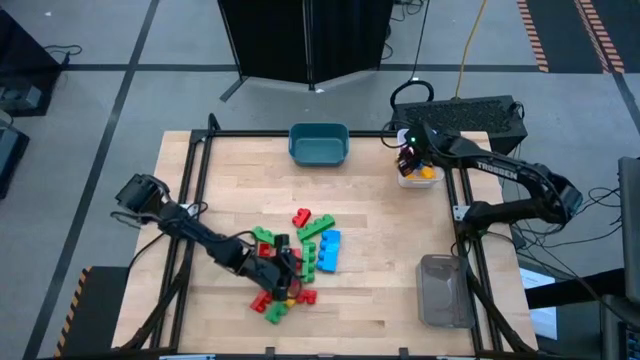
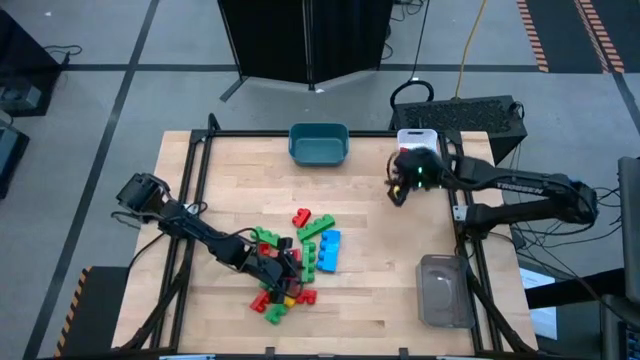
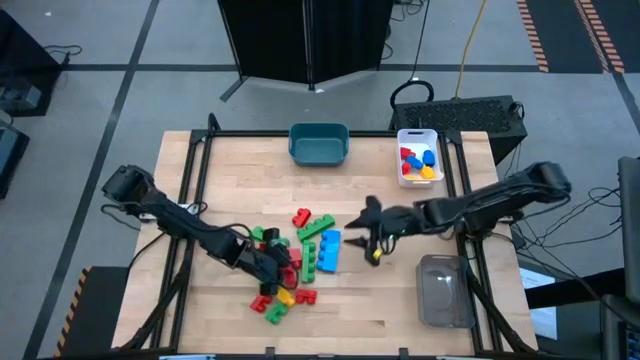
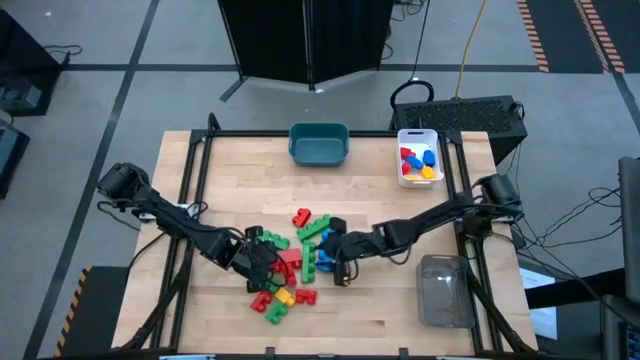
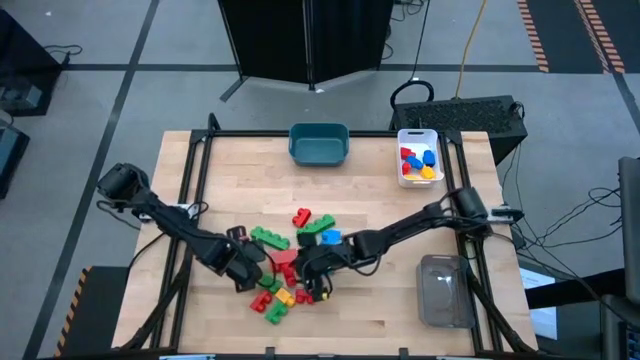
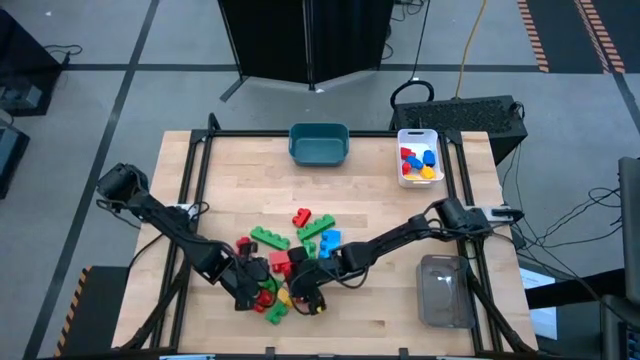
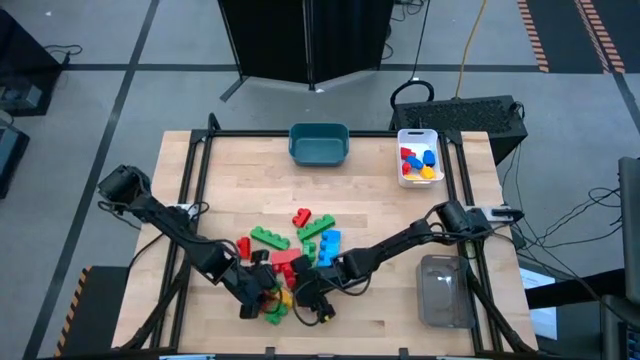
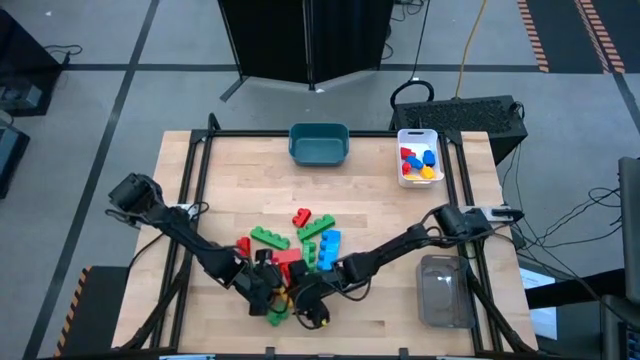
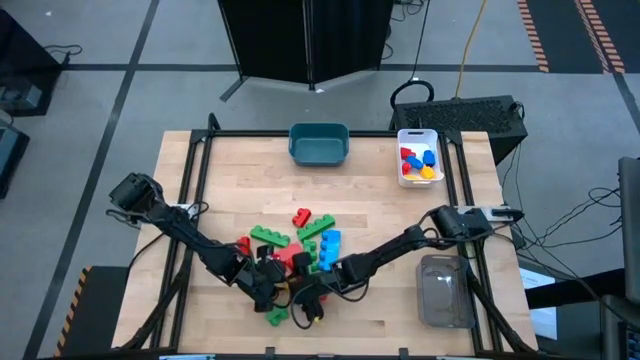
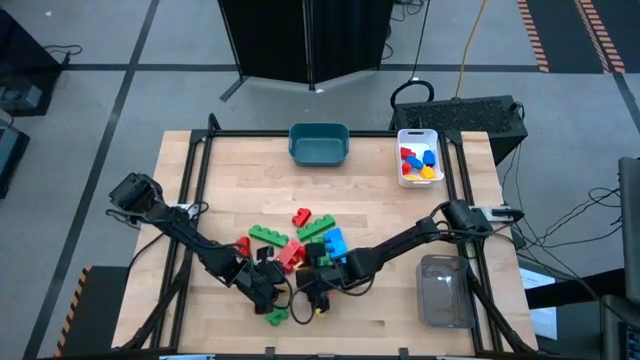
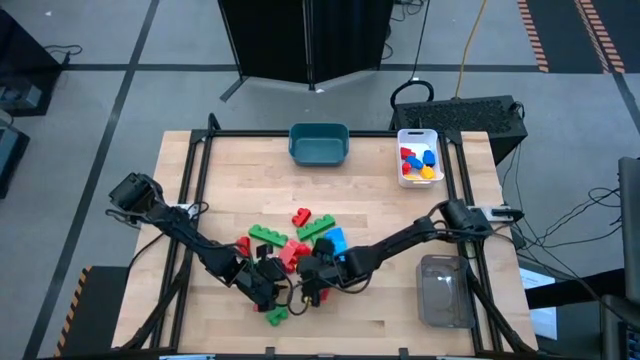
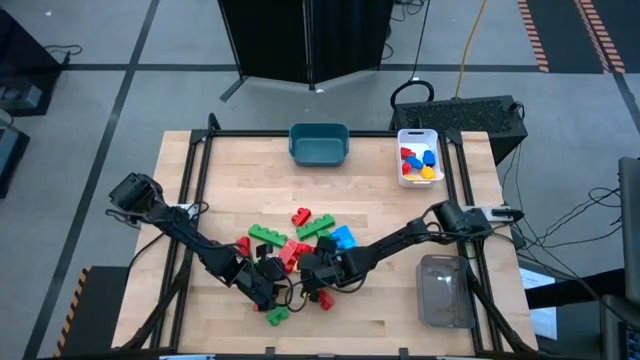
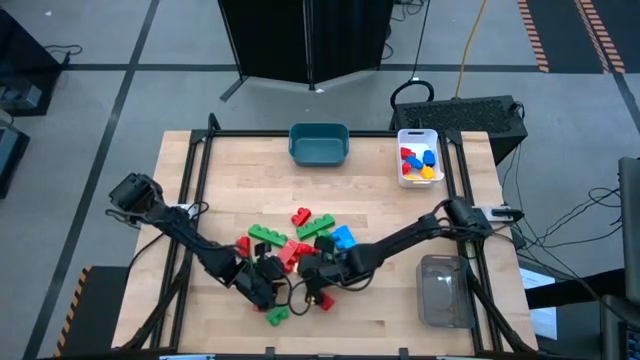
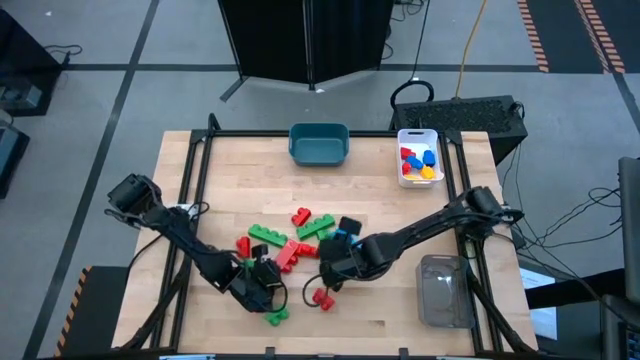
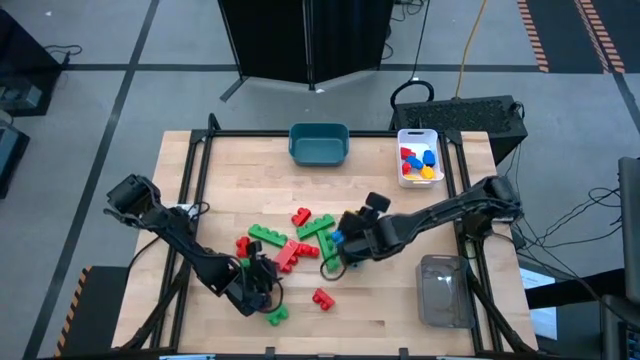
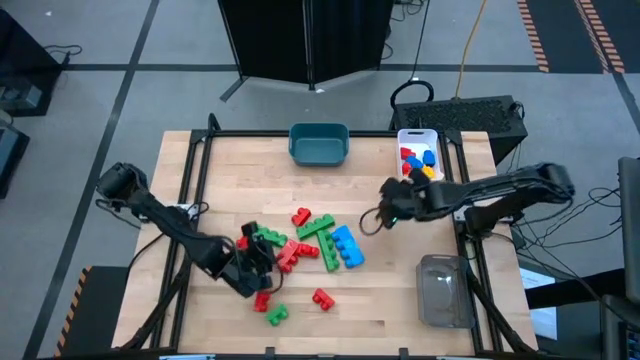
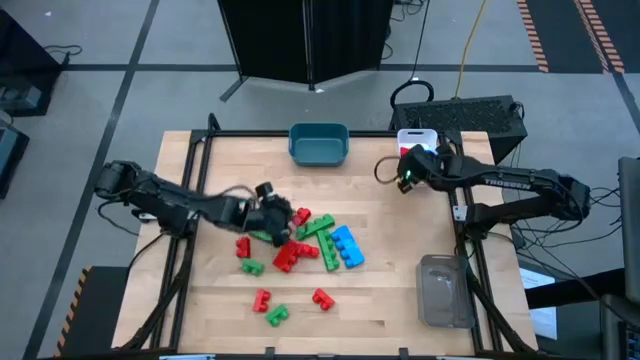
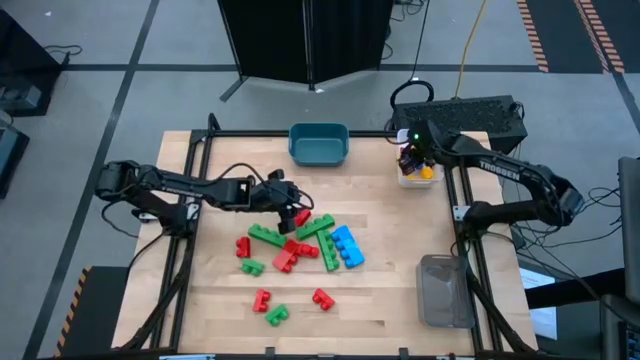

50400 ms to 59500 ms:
Task: Sort blocks by size
Put the one stud yellow game piece into the white bin

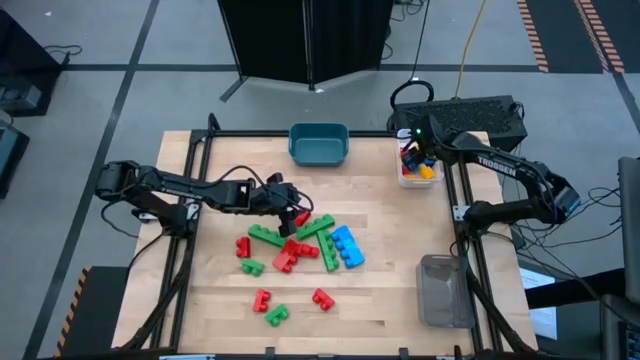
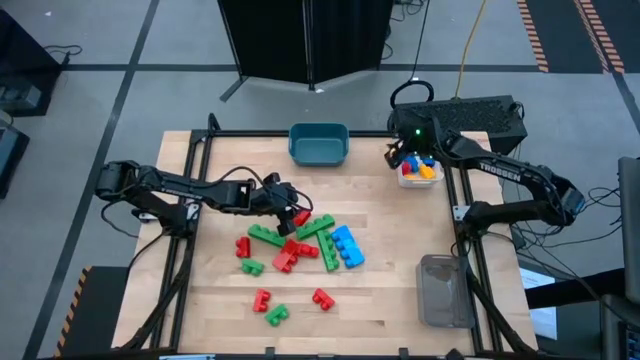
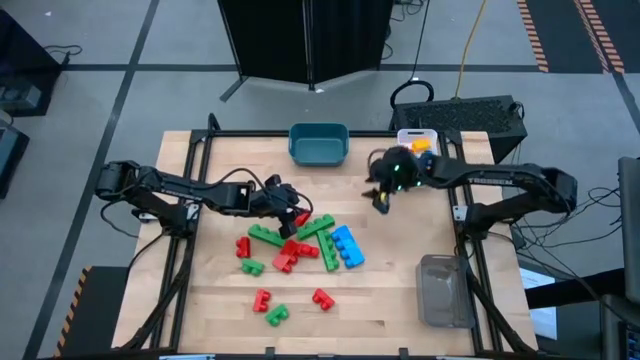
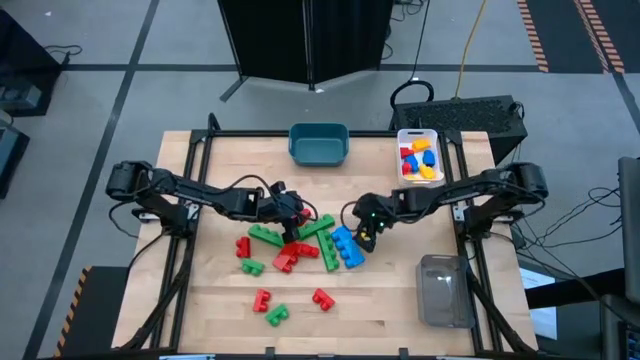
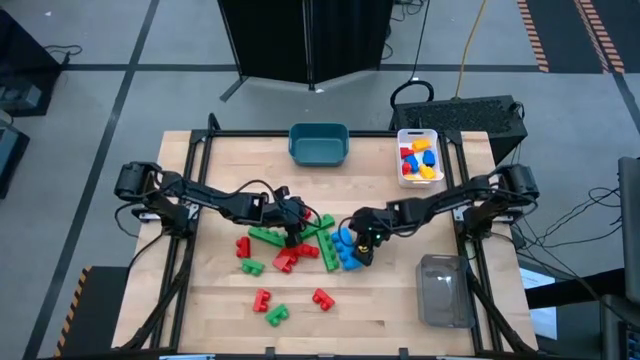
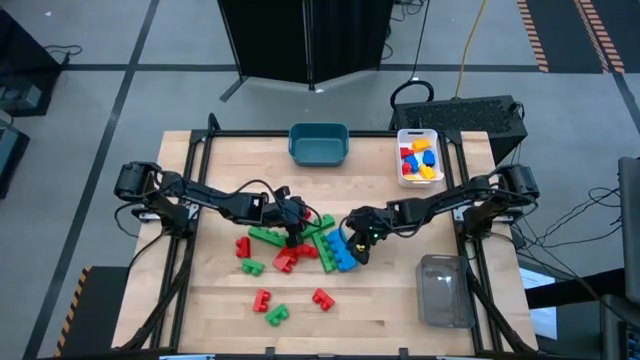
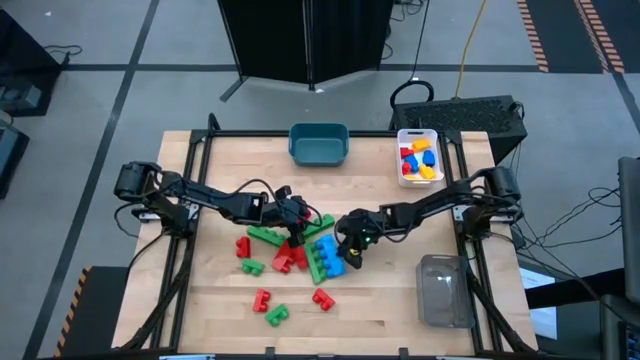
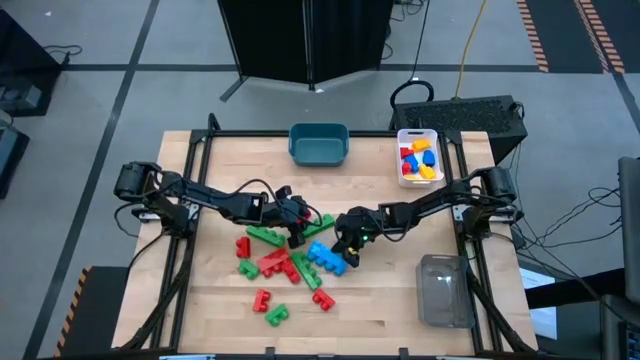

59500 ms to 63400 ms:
Put the four stud blue game piece into the blue bin

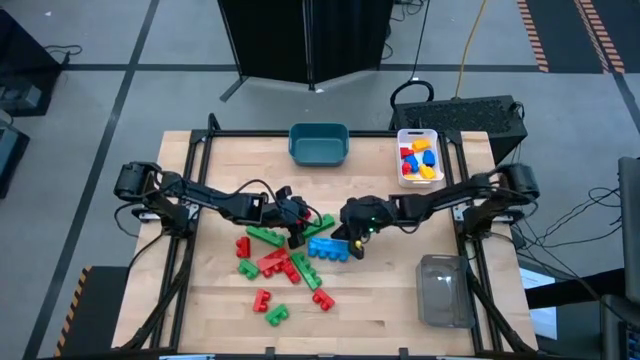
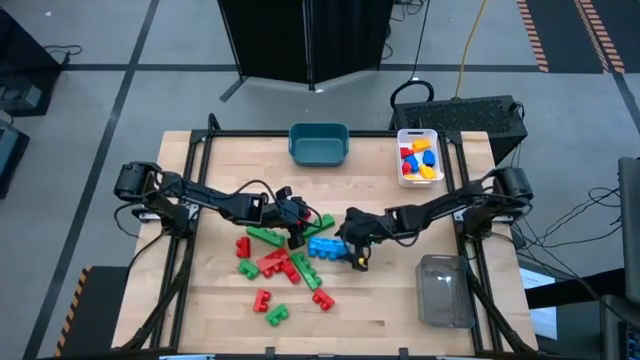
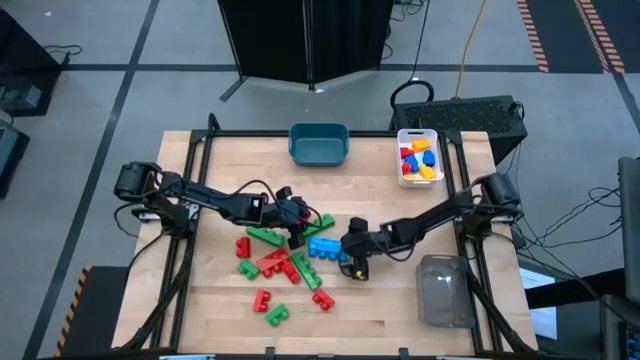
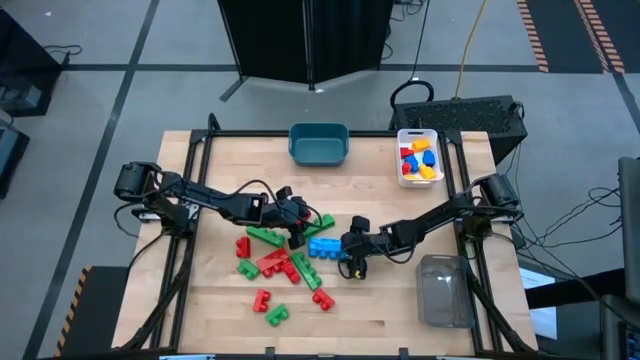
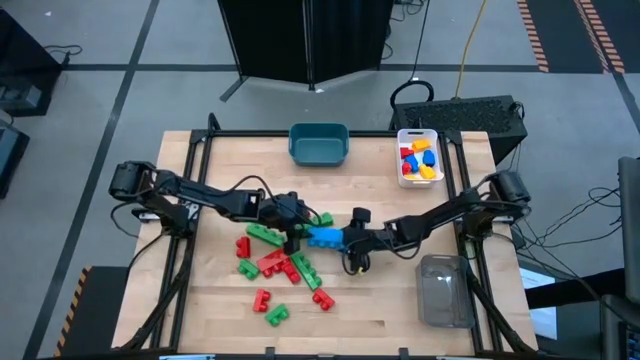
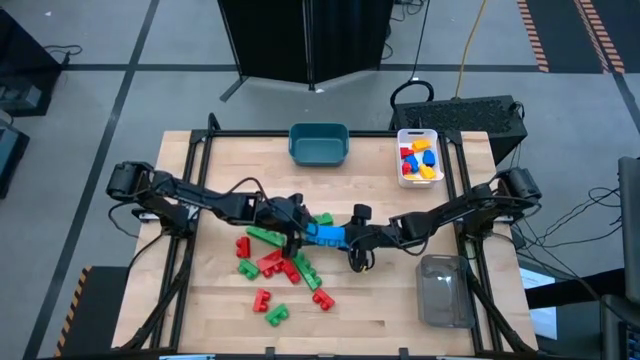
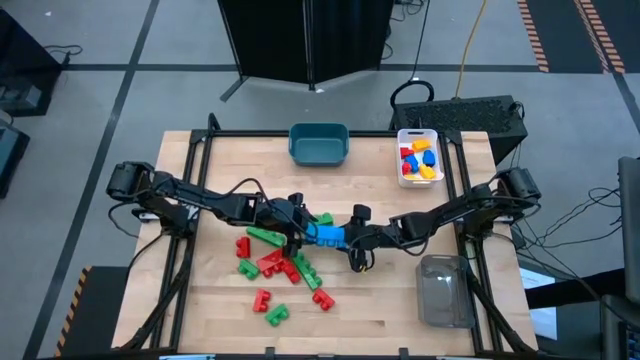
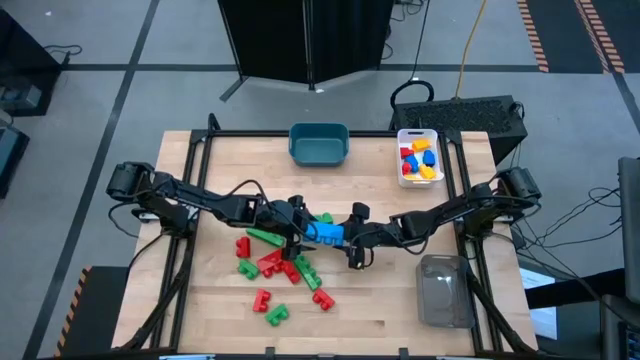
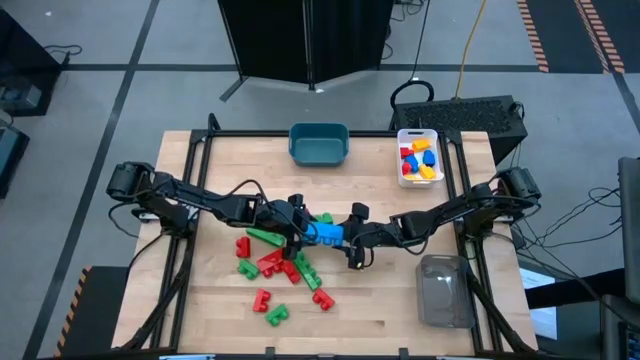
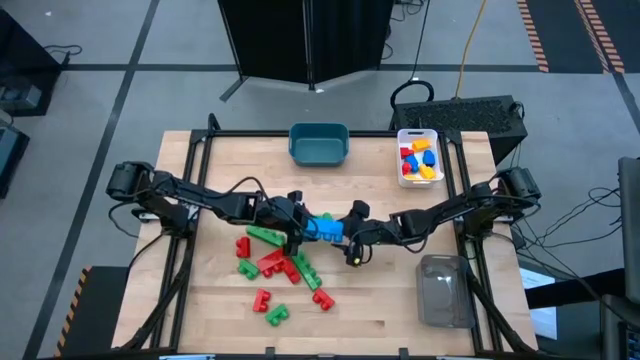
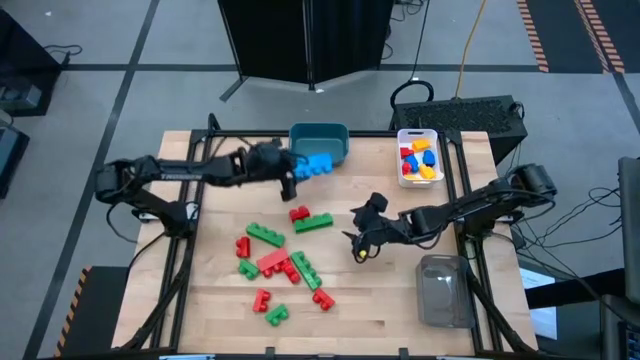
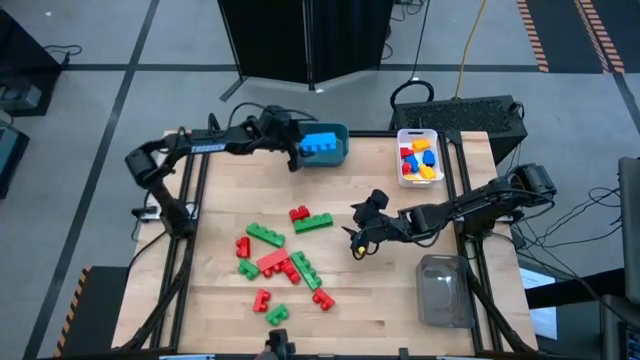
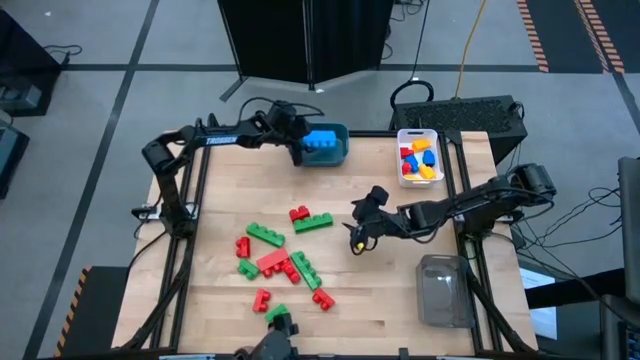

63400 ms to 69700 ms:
Put the four stud blue game piece into the blue bin

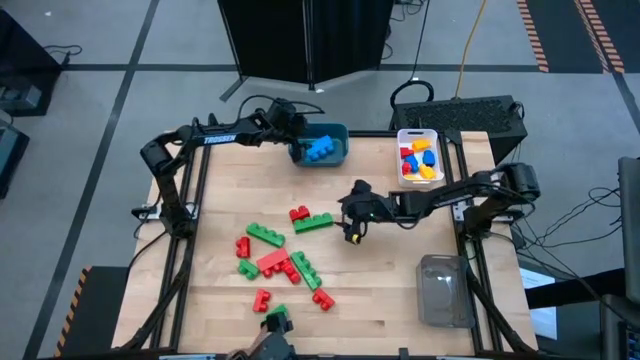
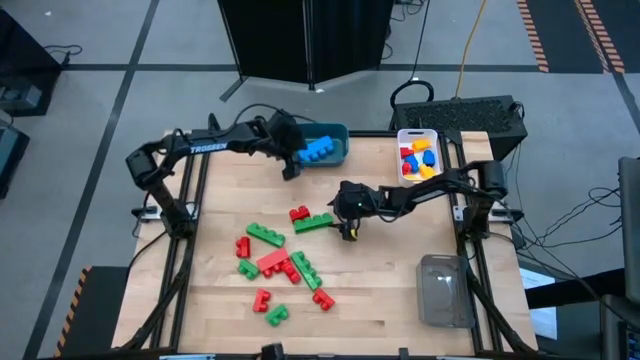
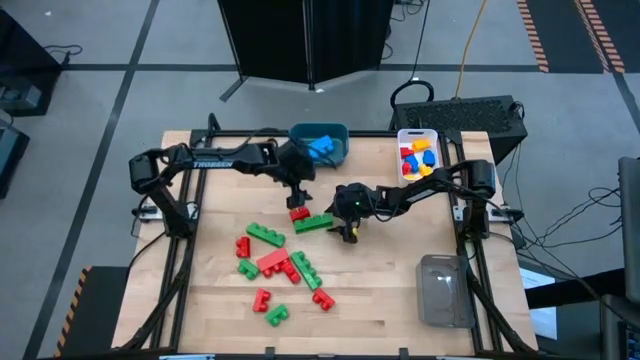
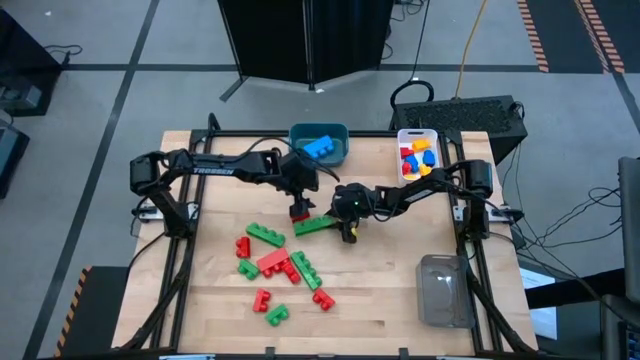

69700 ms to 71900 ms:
Put the four stud green game piece into the blue bin
